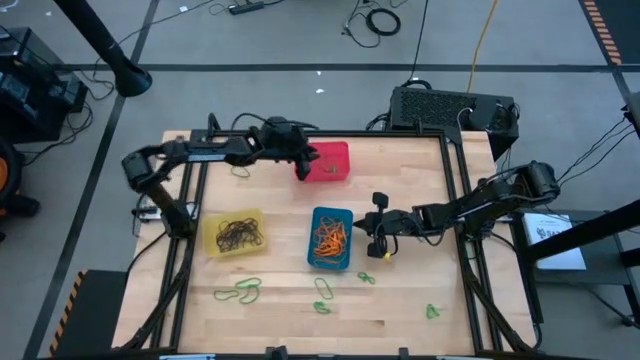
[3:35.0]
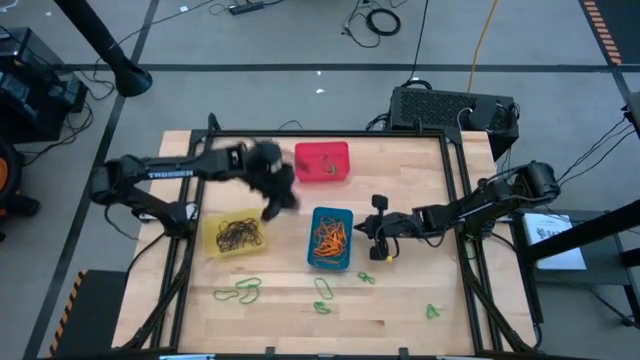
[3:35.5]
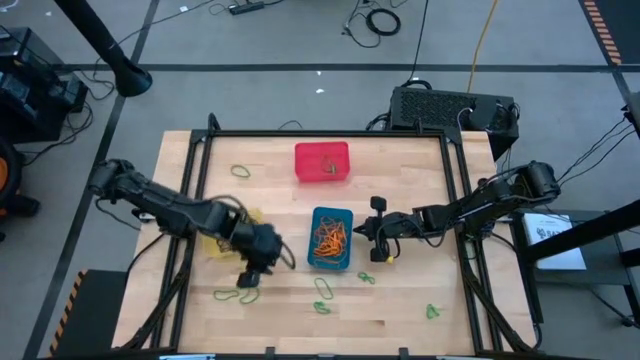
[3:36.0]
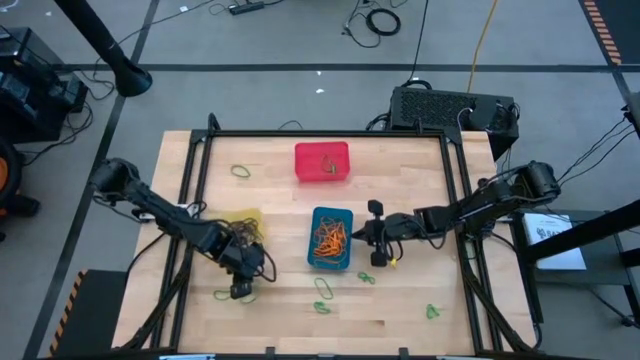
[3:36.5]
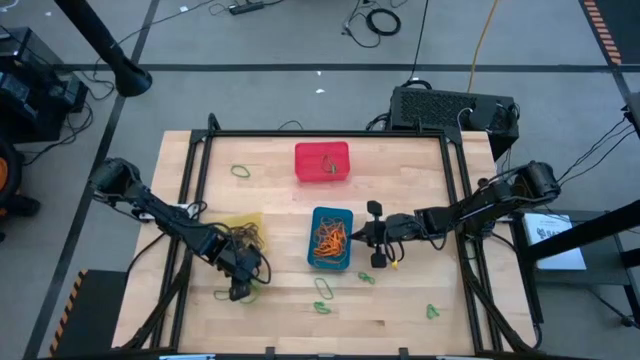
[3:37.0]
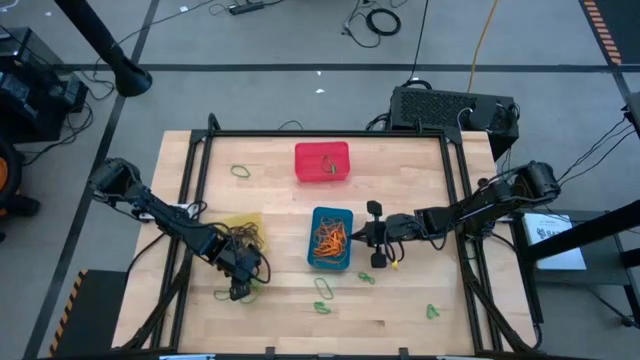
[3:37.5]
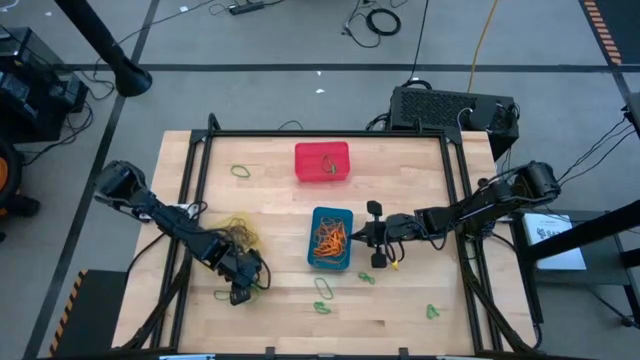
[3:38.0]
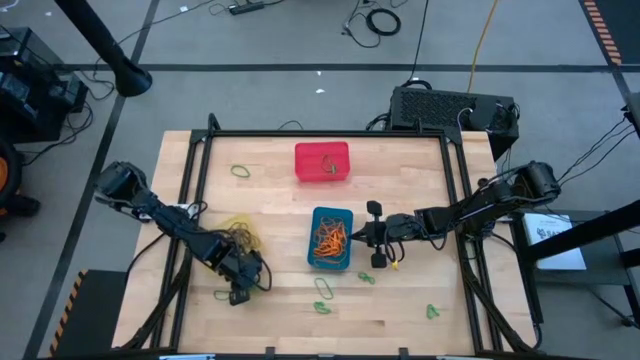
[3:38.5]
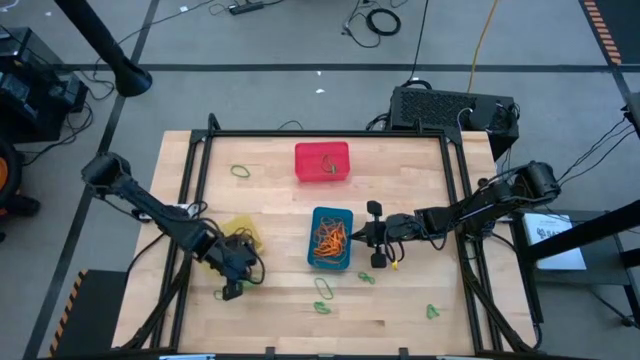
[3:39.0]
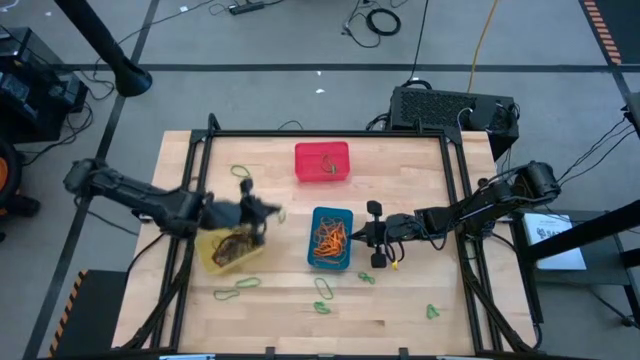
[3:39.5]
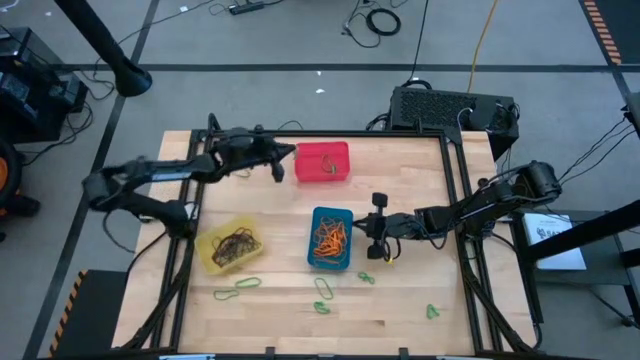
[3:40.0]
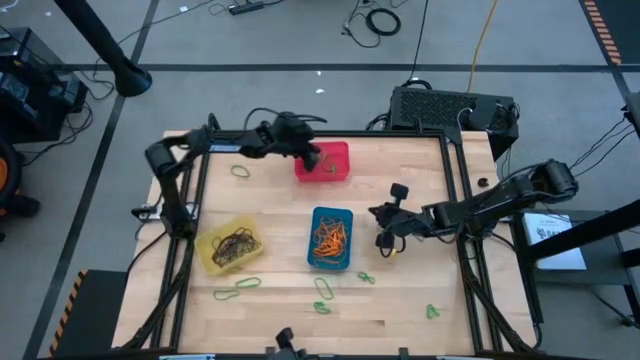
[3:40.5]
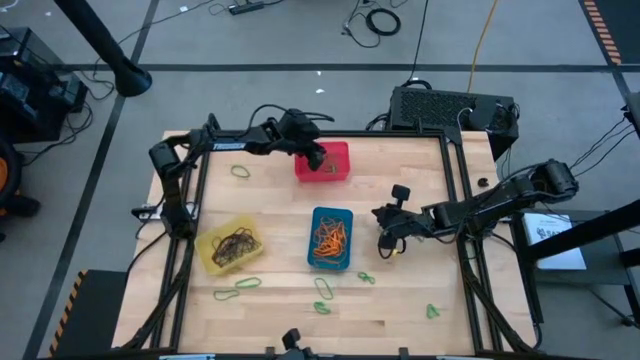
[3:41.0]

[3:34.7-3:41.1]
Task: Sort rubber bands into baskets
Put the green rubber band into the red bin

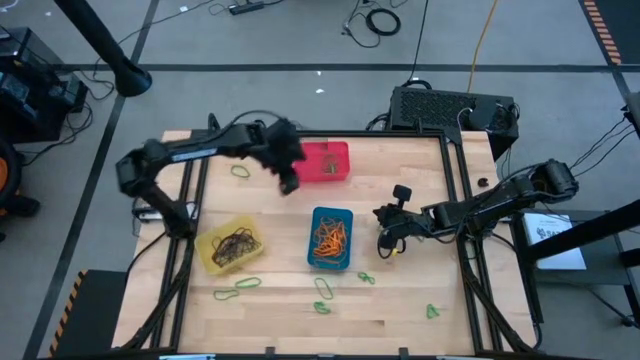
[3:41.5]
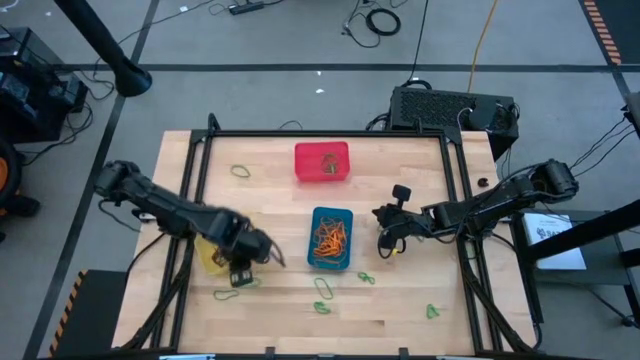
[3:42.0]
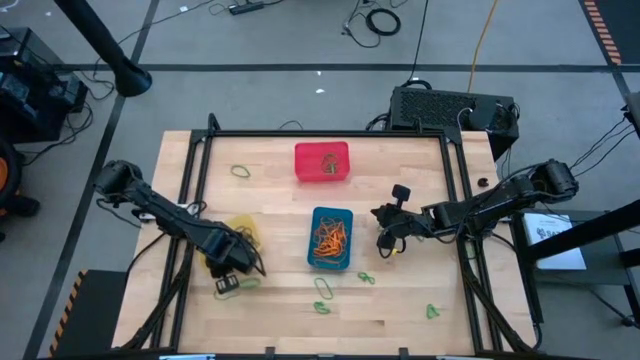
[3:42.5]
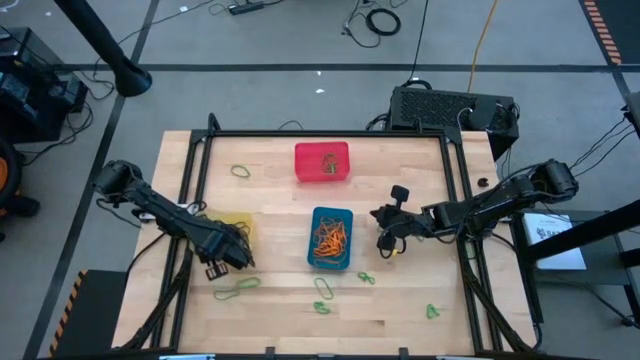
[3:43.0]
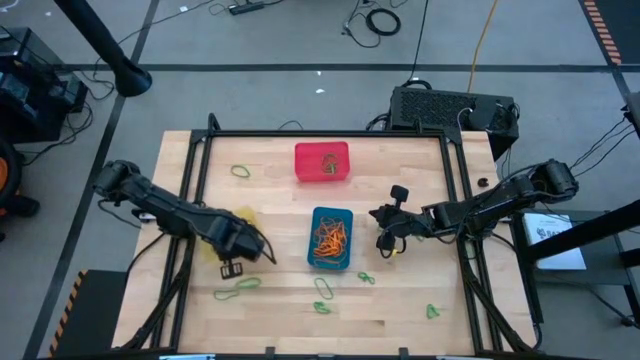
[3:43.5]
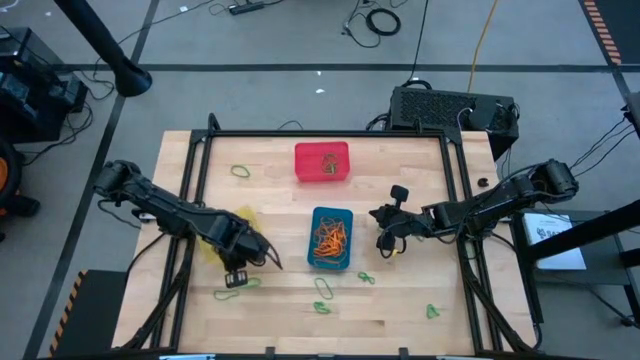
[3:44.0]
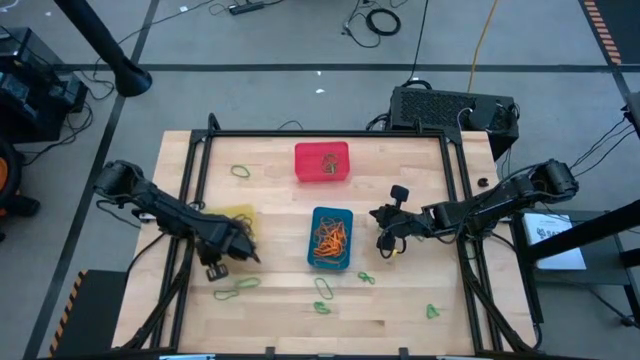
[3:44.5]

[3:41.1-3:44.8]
Adjust the yellow bin on the table

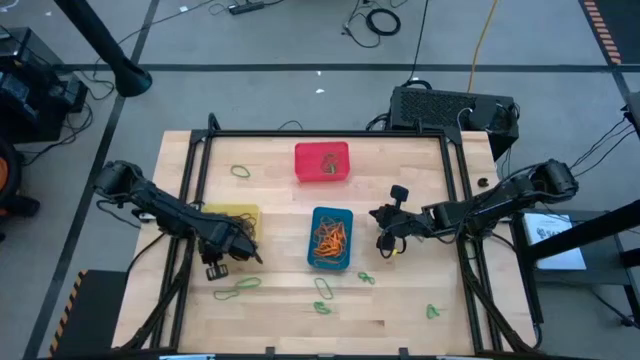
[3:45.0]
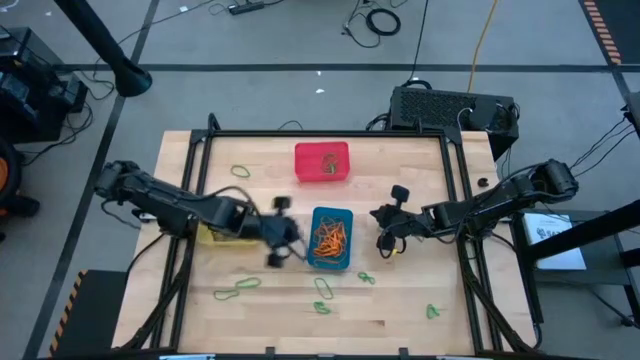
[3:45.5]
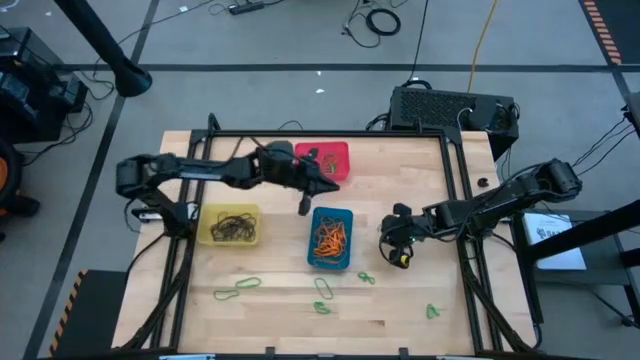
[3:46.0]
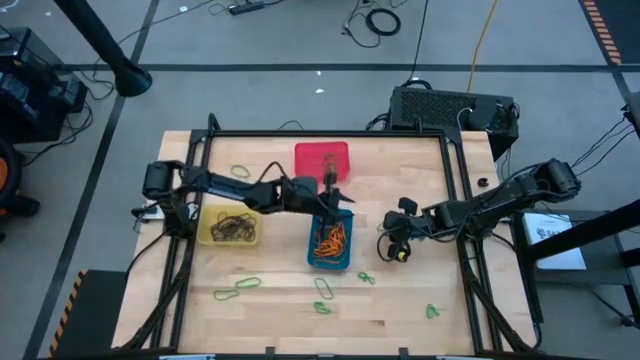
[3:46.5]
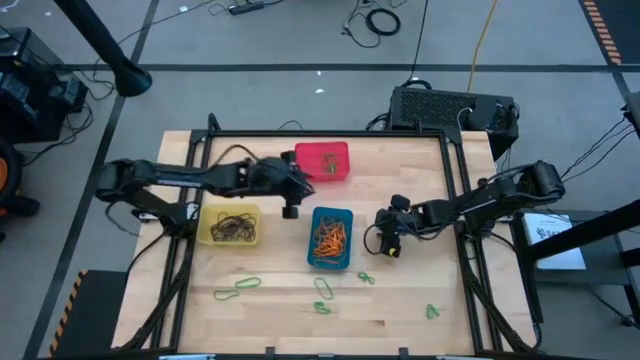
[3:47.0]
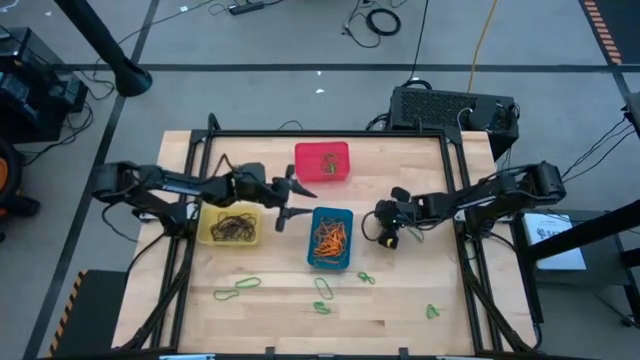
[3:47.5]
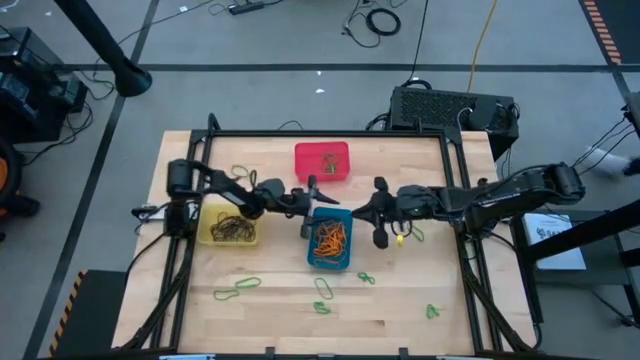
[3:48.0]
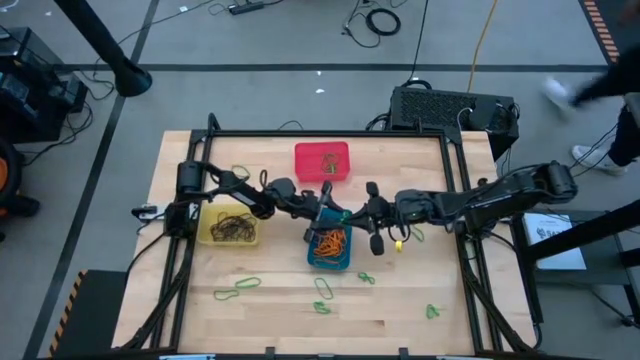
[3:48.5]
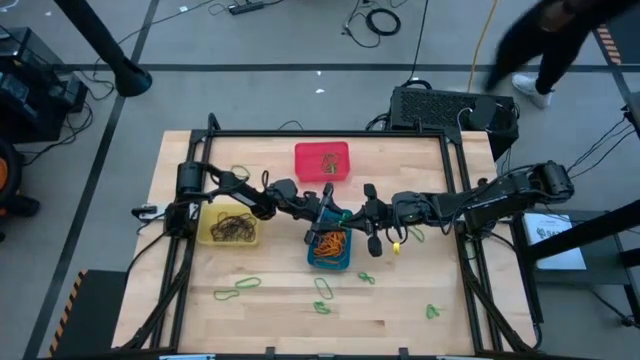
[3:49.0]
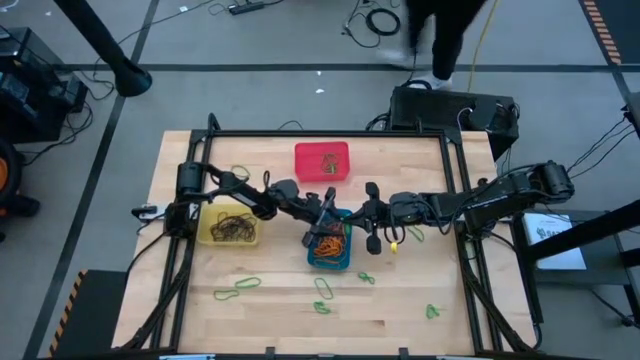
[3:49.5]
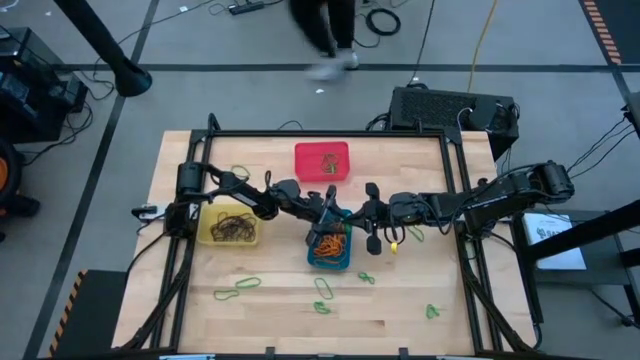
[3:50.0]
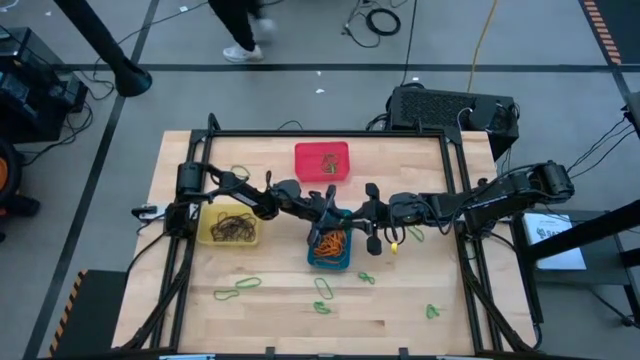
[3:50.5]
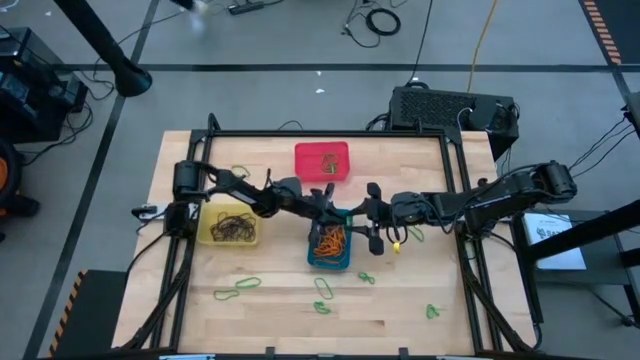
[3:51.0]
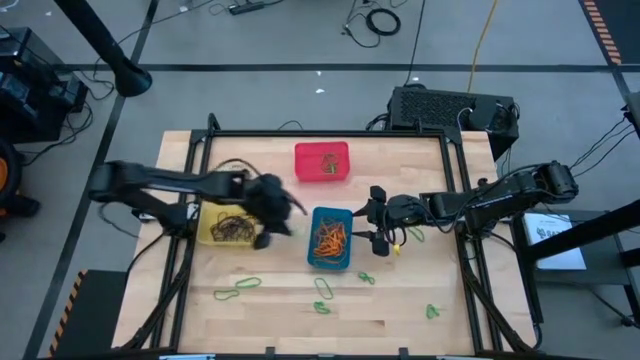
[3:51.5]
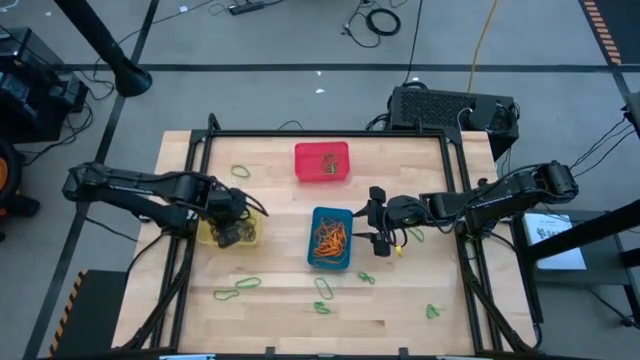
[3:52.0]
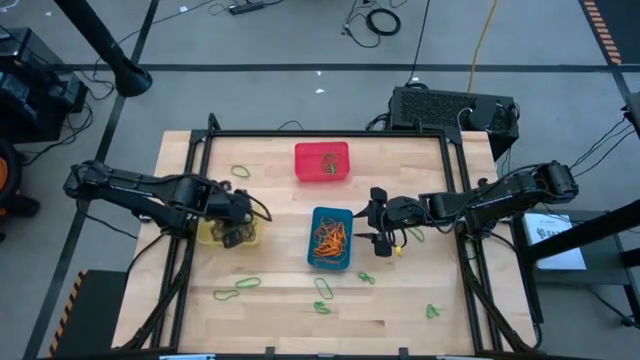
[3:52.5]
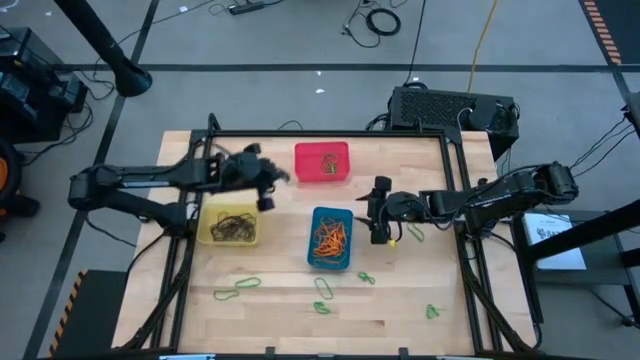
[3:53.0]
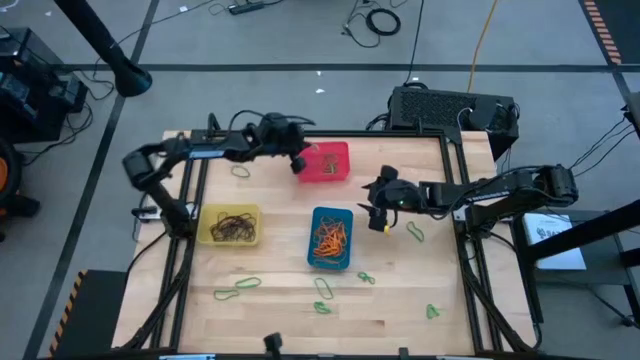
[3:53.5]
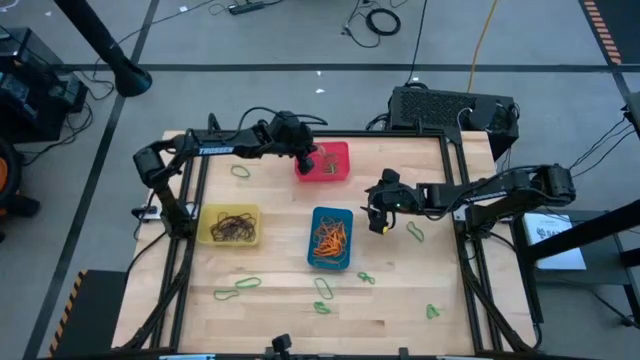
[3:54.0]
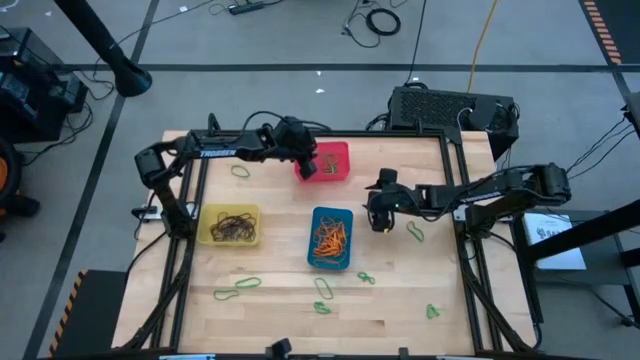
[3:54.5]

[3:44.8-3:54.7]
Put the green rubber band into the red bin

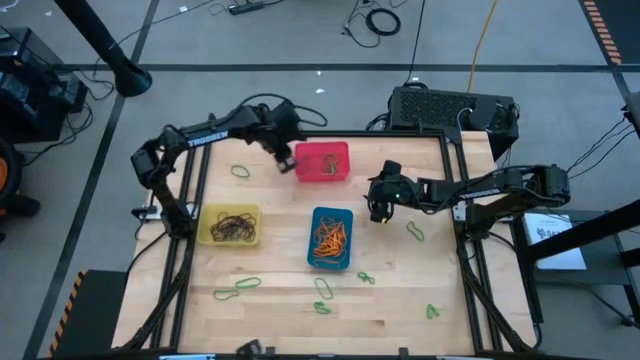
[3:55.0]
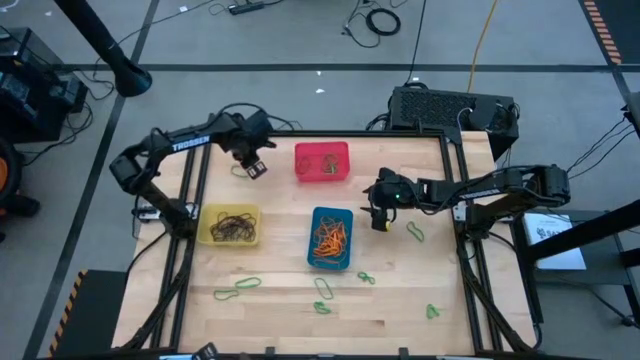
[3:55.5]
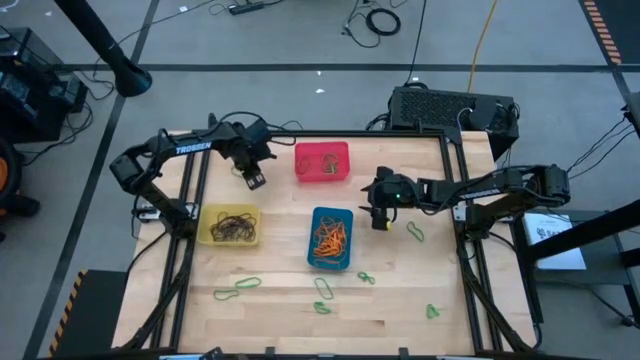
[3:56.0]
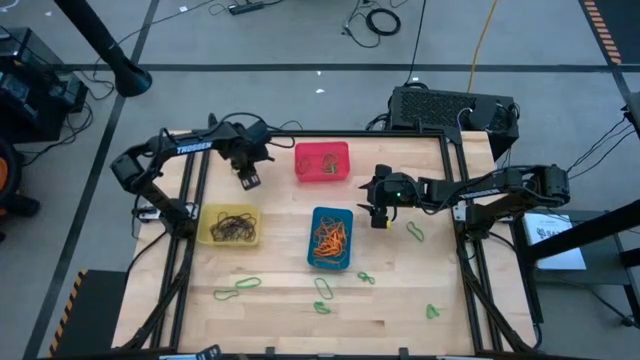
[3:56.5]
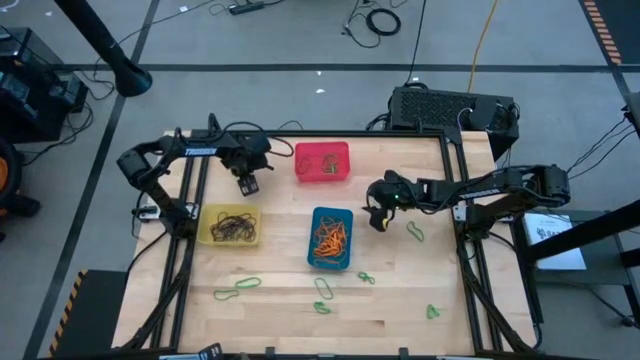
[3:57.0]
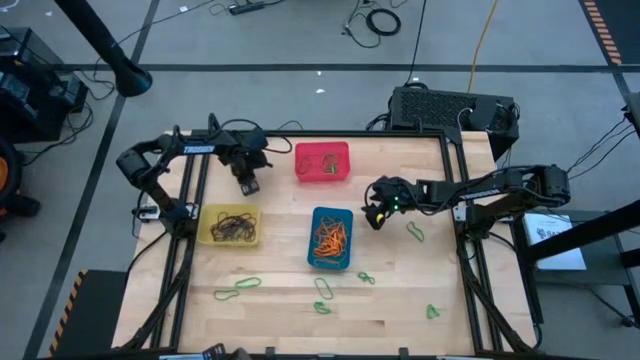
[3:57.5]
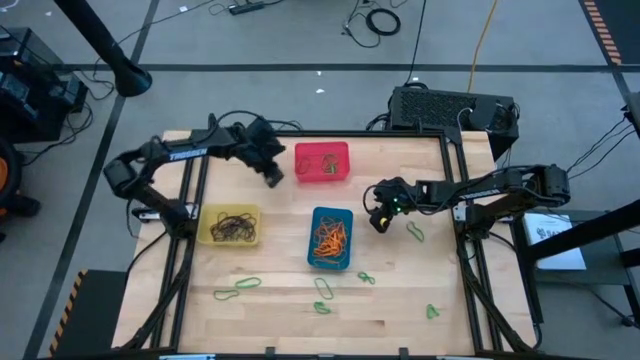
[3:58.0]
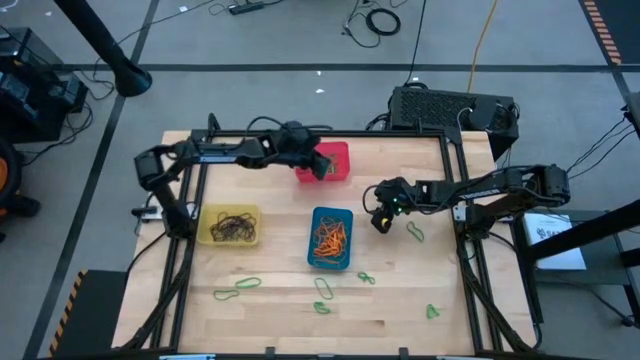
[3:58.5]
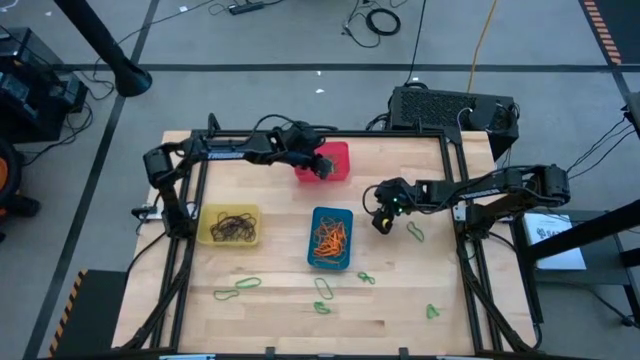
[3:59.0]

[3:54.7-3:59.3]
Put the green rubber band into the red bin
